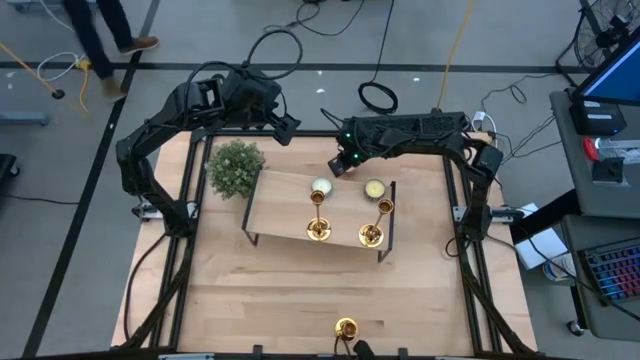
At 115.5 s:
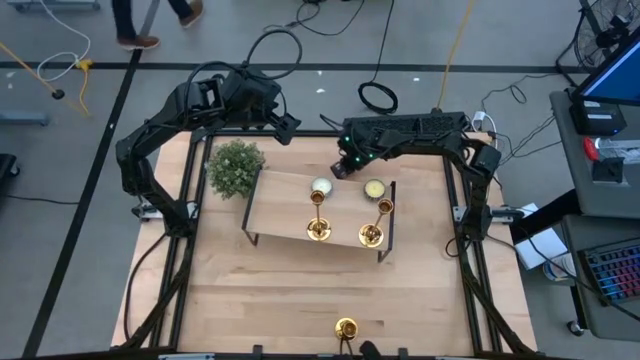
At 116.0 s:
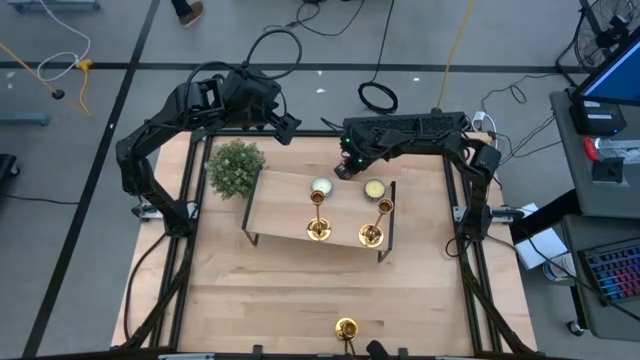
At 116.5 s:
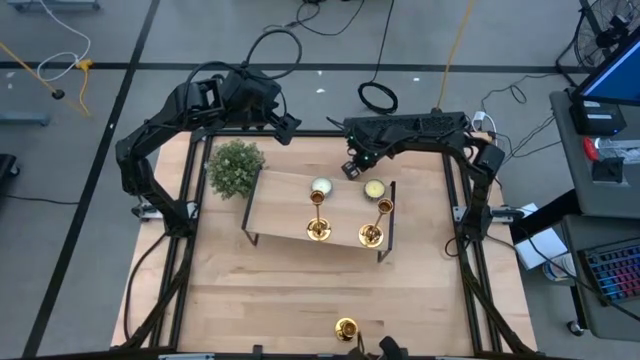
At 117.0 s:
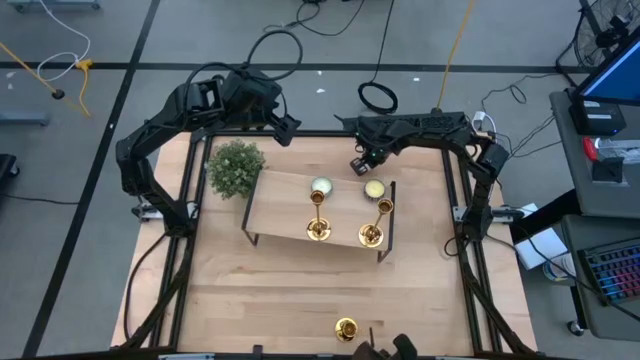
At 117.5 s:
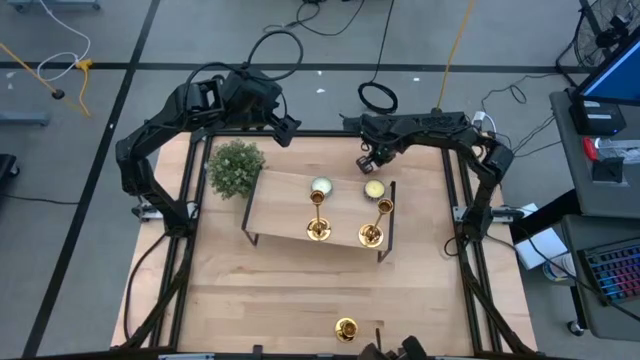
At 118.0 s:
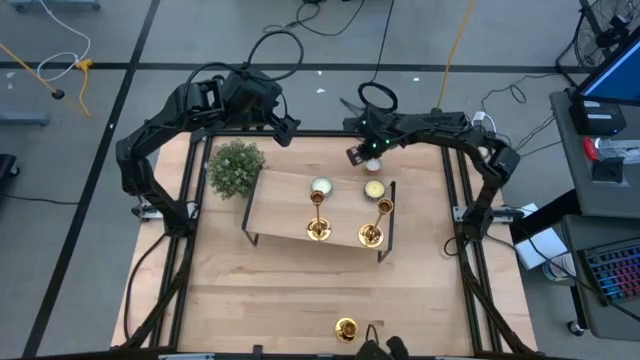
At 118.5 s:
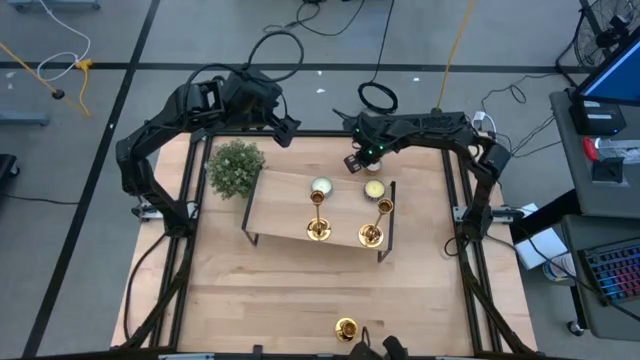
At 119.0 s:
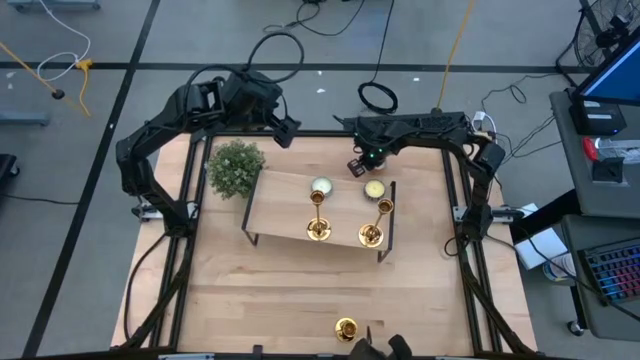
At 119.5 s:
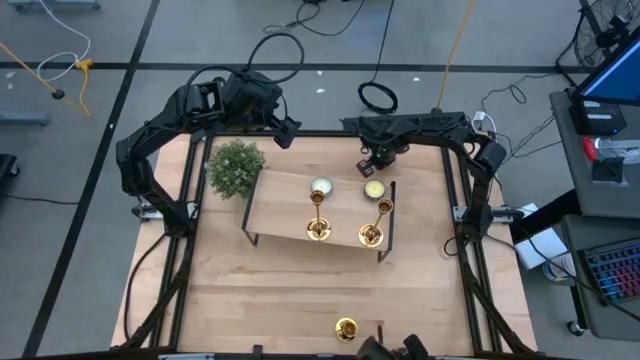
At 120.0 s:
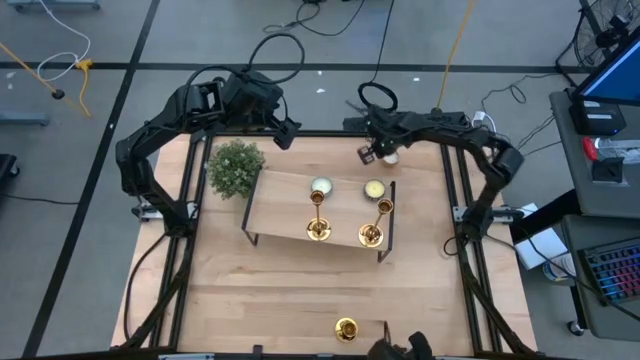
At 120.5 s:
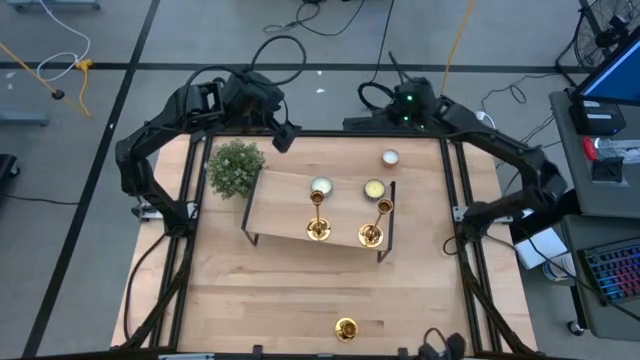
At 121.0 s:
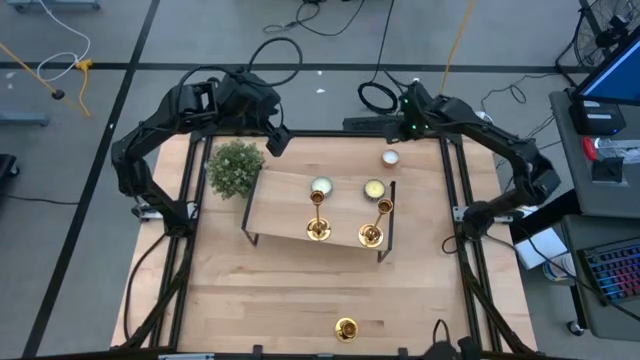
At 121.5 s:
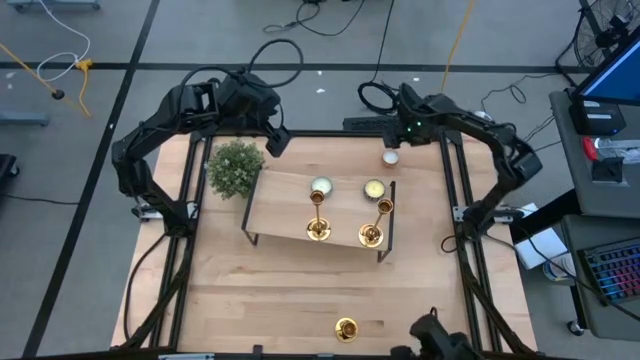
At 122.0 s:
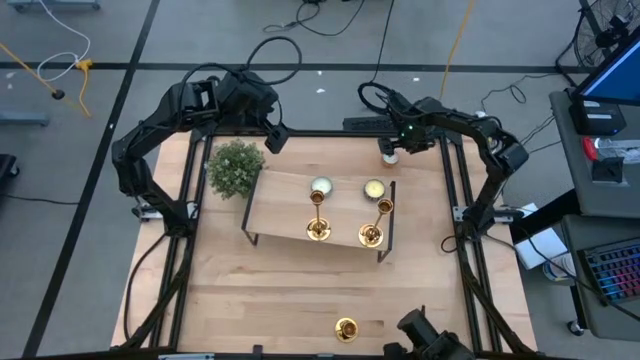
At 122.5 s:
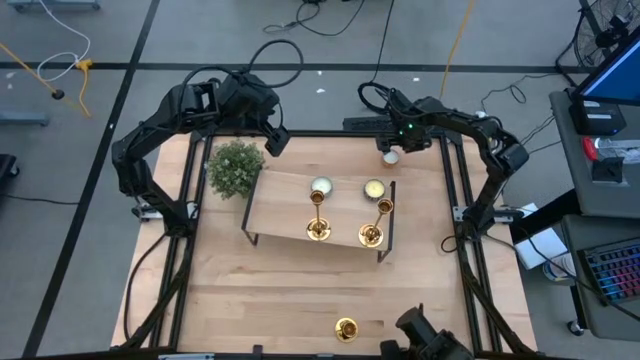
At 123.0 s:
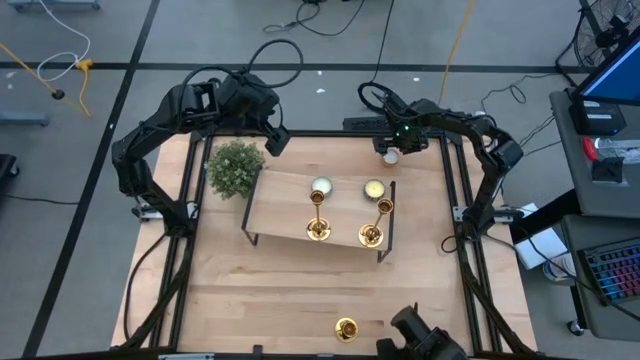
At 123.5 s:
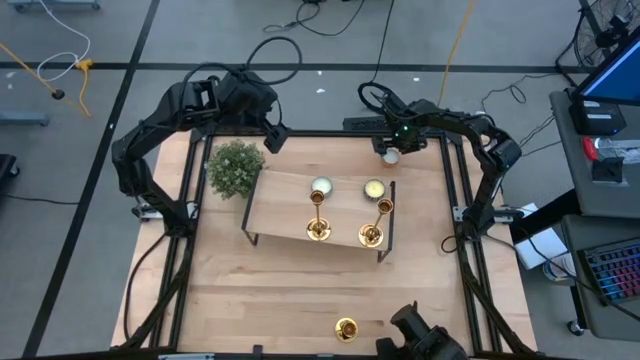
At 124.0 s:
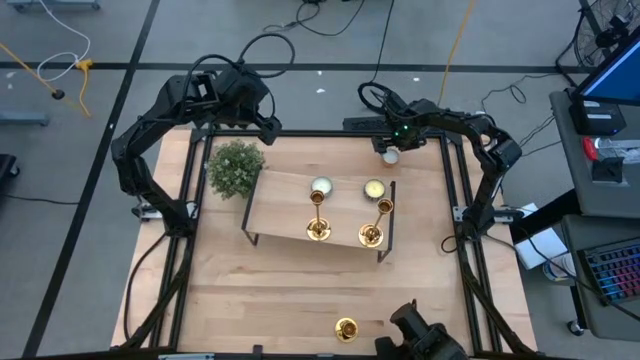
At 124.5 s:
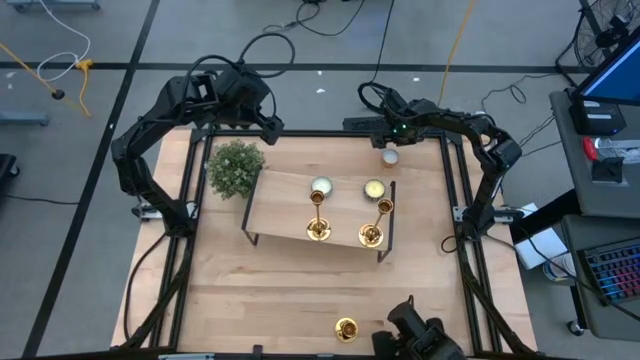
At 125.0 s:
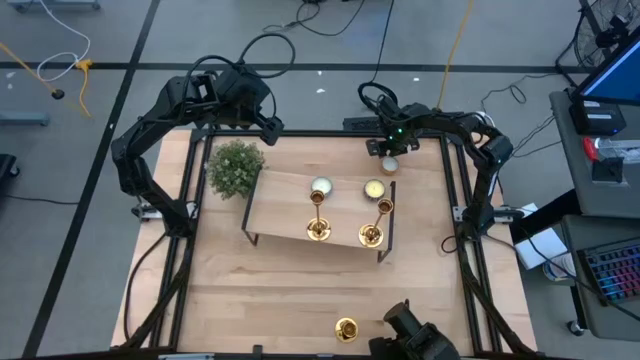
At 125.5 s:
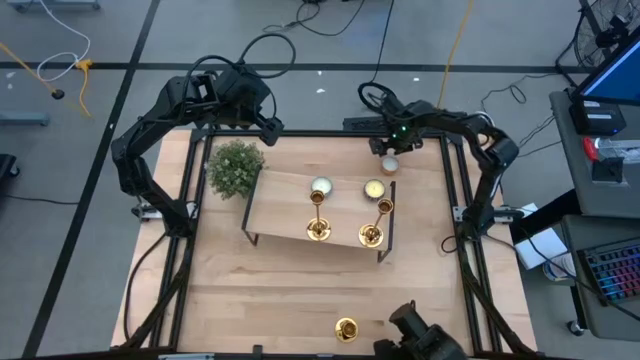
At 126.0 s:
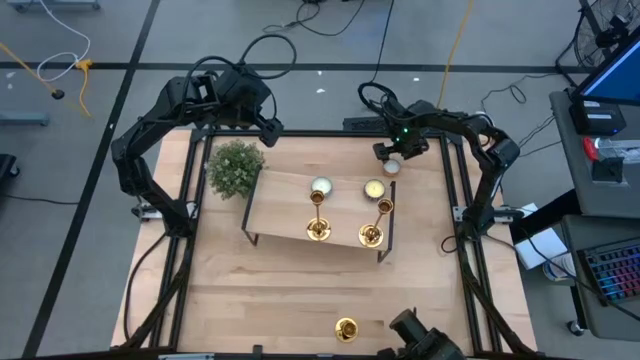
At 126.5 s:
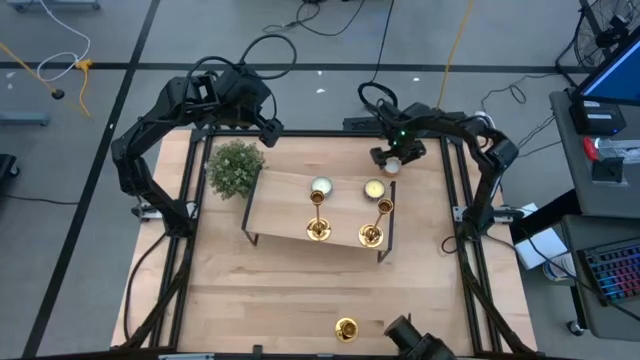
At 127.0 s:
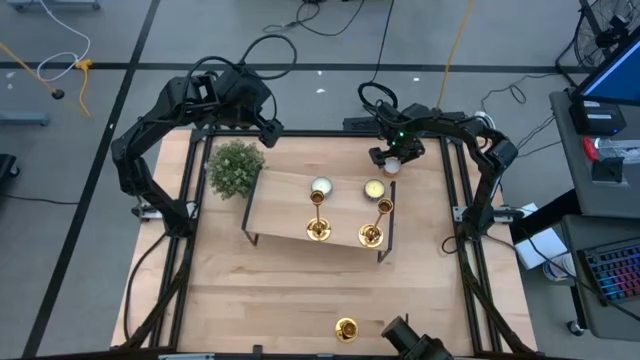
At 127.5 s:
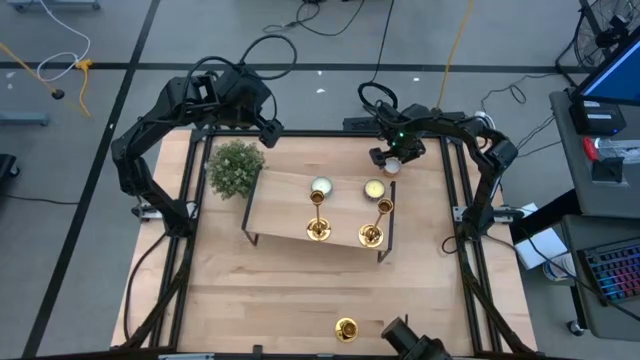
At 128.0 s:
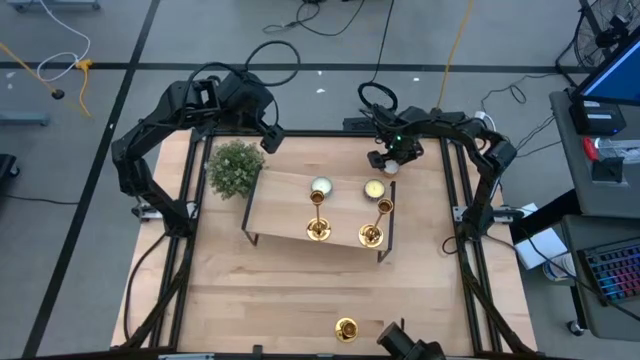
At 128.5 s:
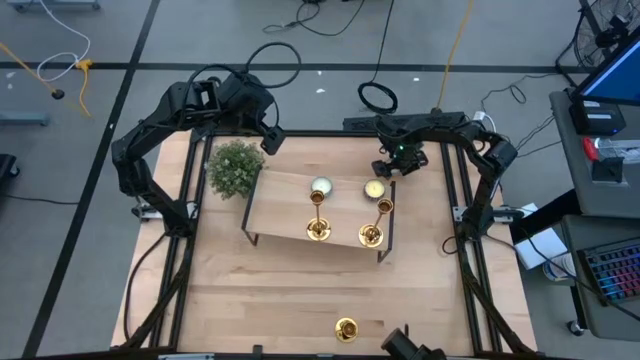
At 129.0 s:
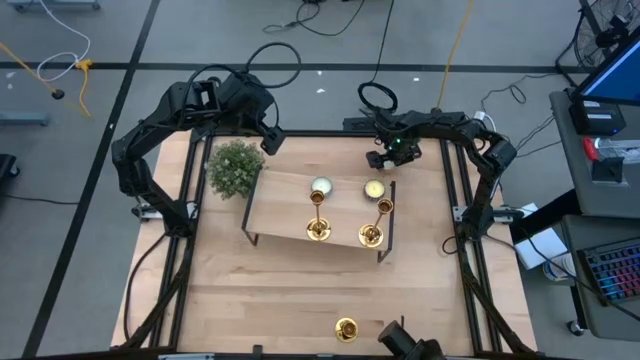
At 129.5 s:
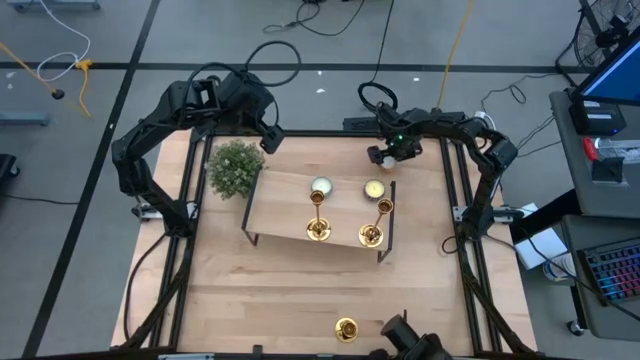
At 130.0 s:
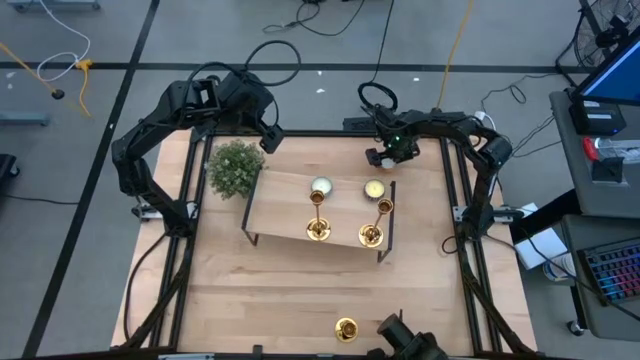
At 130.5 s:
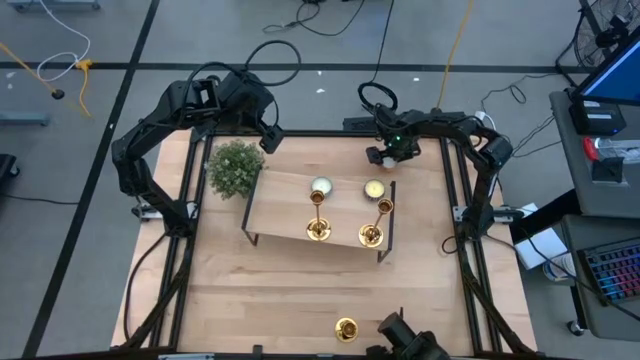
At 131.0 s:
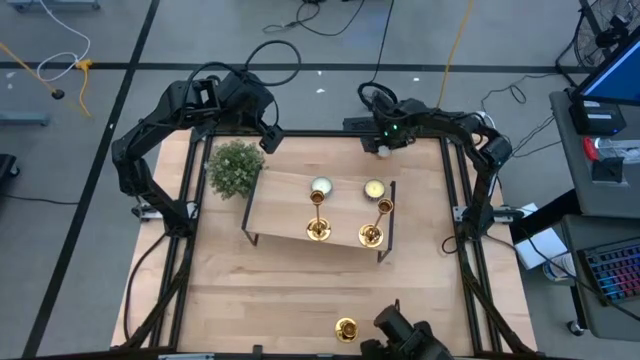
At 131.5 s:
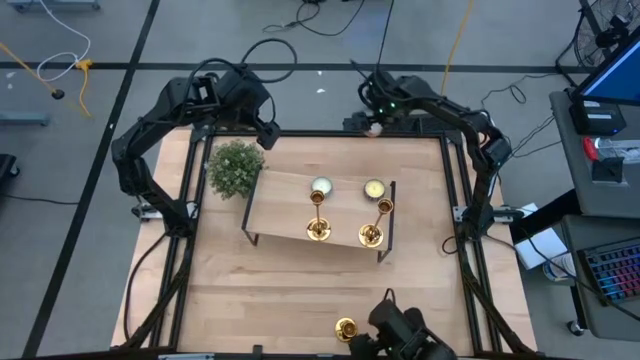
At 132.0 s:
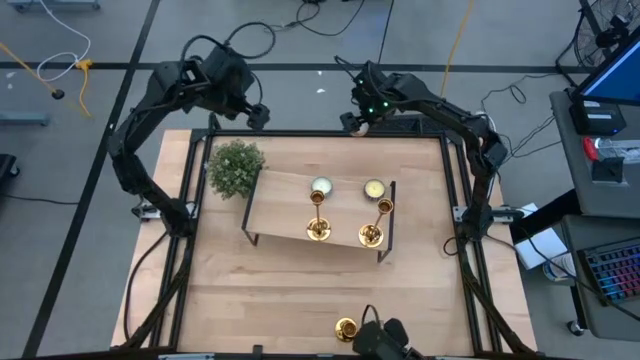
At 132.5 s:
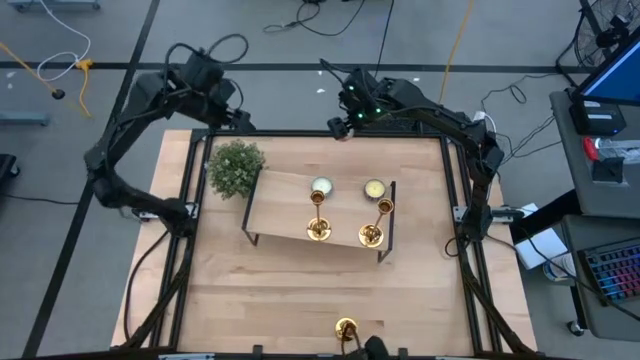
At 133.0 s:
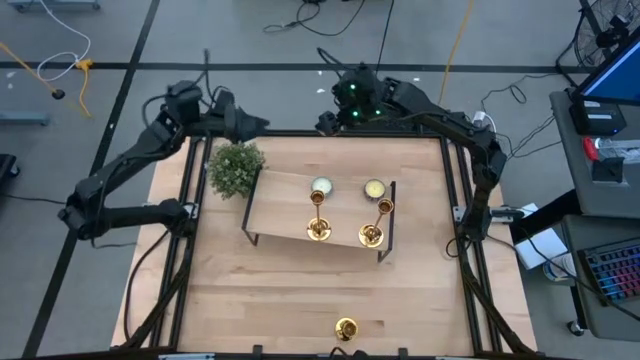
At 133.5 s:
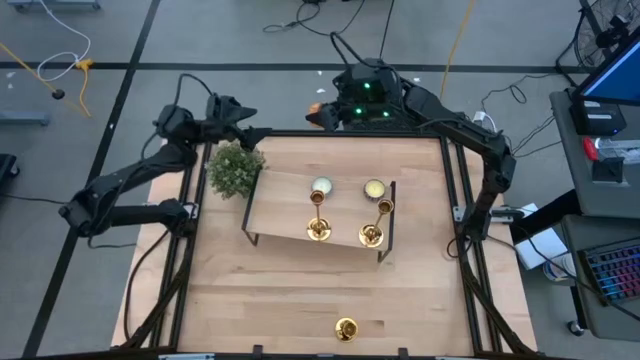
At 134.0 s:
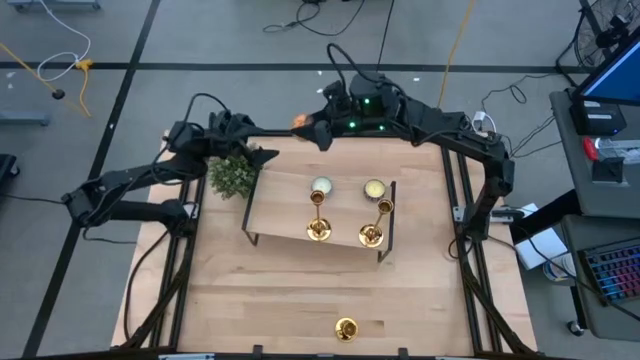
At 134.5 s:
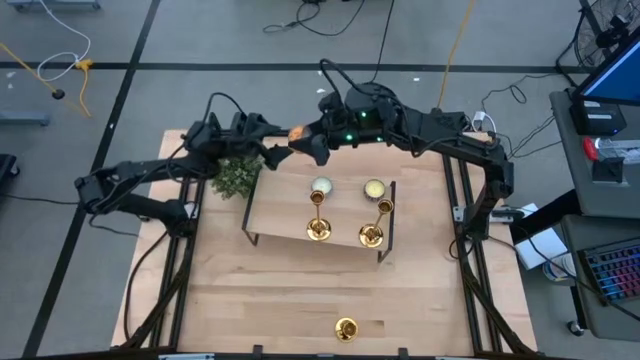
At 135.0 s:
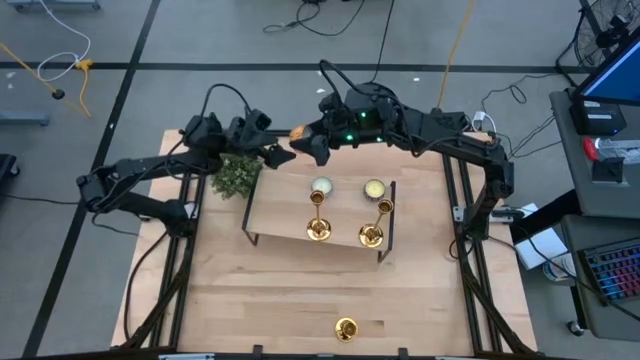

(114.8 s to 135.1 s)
Task: Pick & Place candle stick holders
Put the scented candle on the shelf
